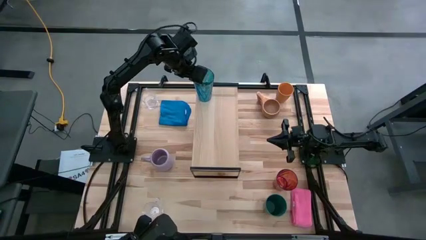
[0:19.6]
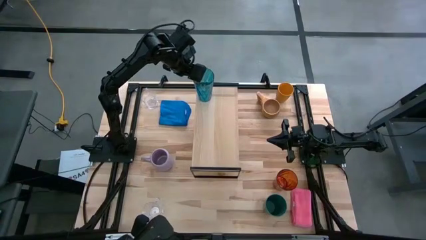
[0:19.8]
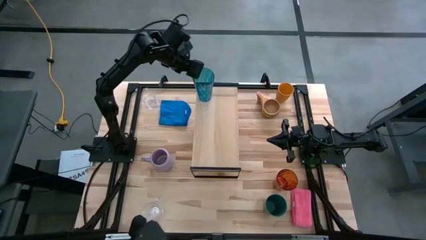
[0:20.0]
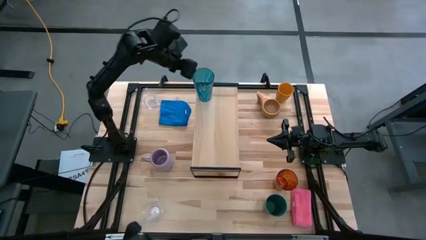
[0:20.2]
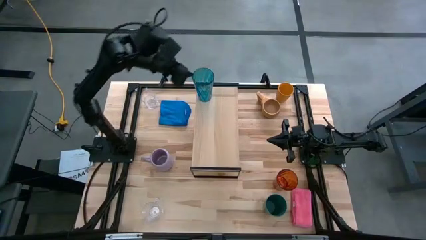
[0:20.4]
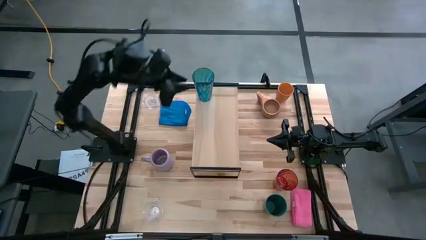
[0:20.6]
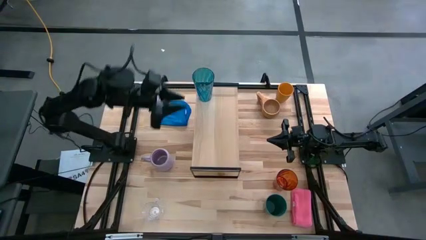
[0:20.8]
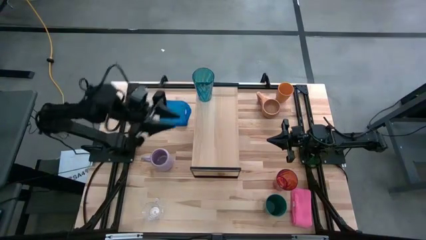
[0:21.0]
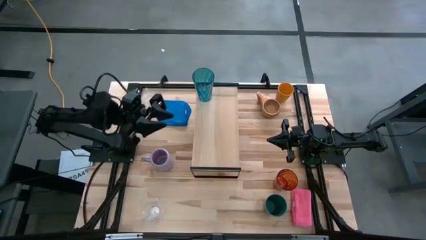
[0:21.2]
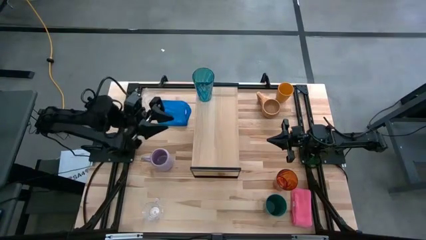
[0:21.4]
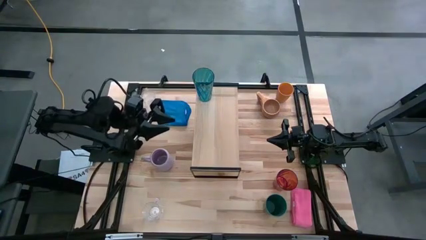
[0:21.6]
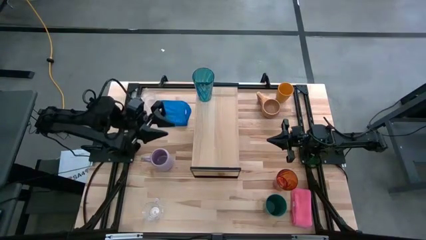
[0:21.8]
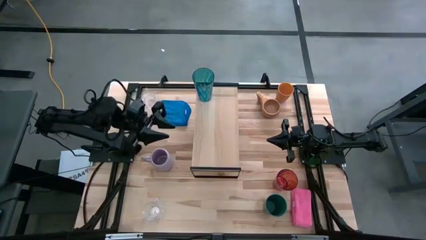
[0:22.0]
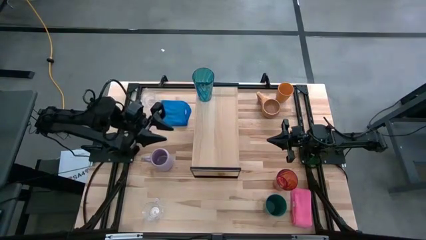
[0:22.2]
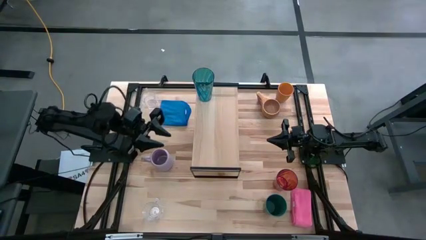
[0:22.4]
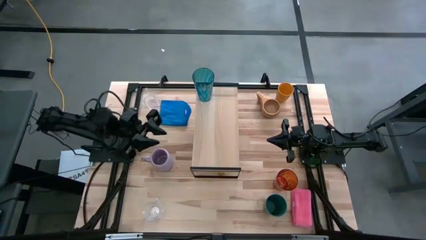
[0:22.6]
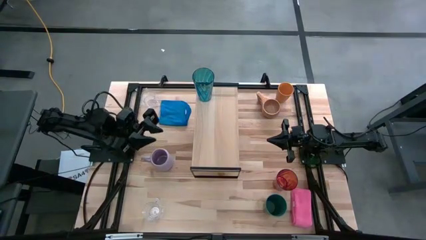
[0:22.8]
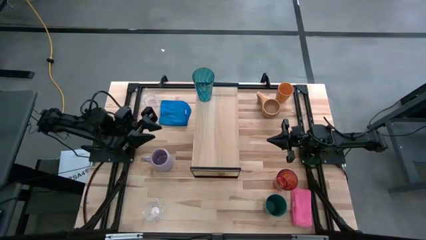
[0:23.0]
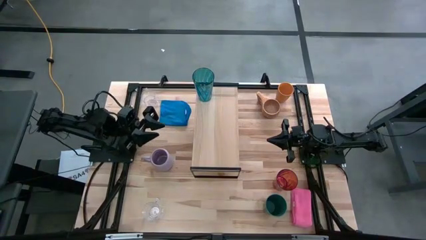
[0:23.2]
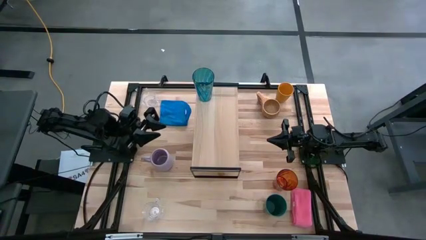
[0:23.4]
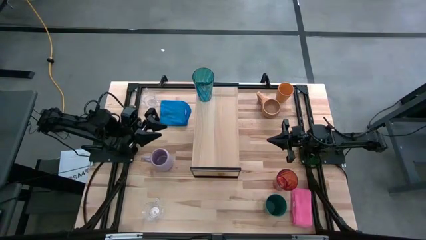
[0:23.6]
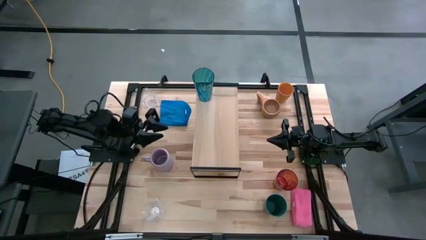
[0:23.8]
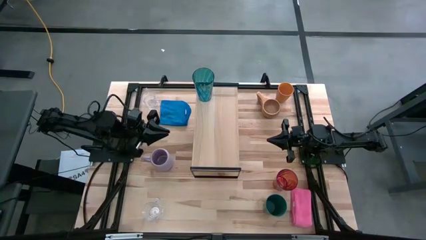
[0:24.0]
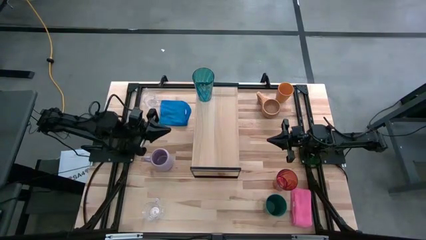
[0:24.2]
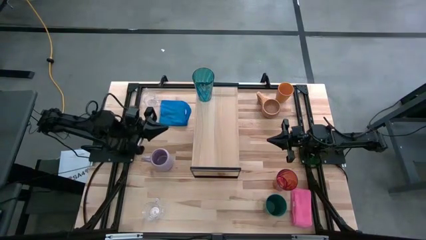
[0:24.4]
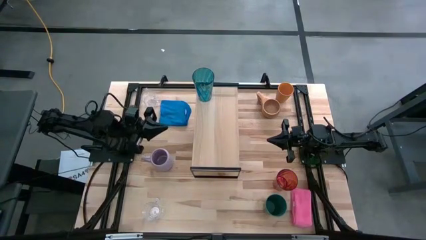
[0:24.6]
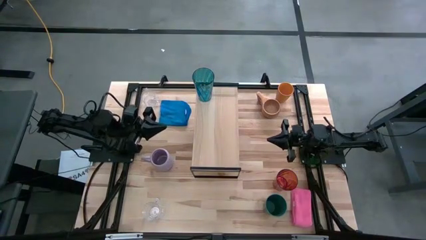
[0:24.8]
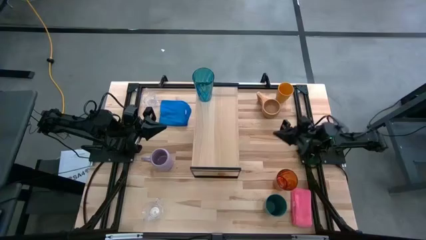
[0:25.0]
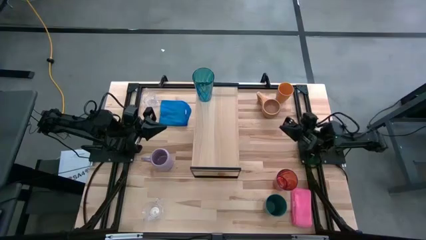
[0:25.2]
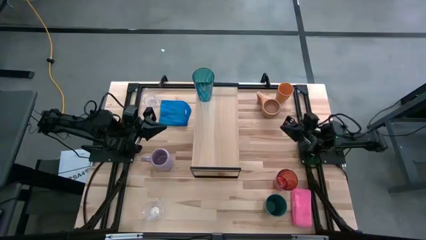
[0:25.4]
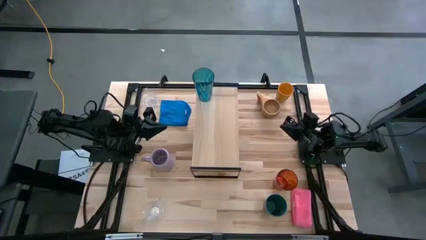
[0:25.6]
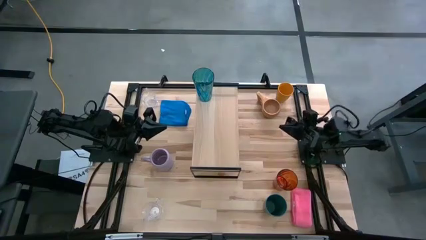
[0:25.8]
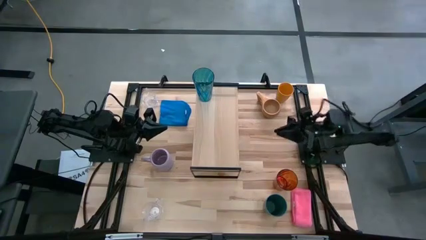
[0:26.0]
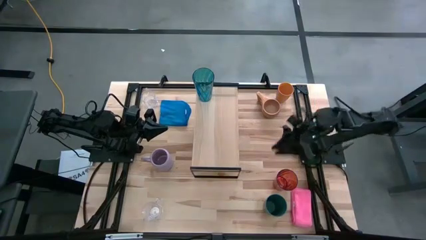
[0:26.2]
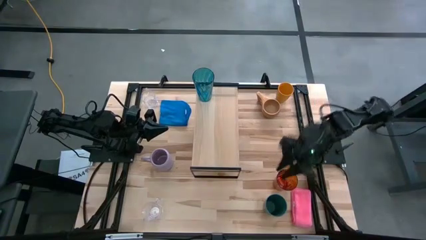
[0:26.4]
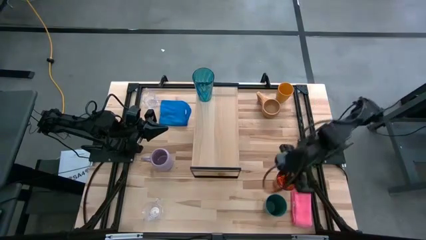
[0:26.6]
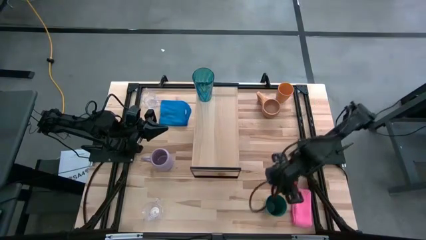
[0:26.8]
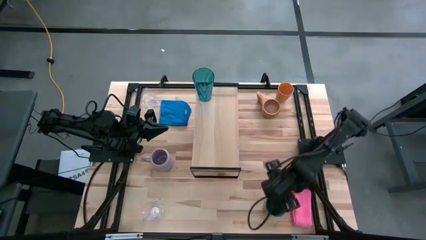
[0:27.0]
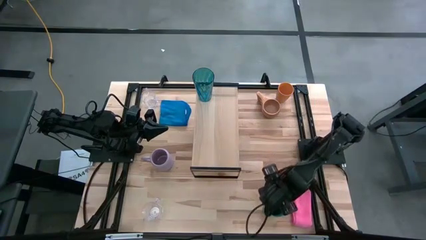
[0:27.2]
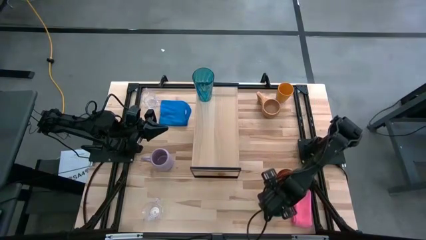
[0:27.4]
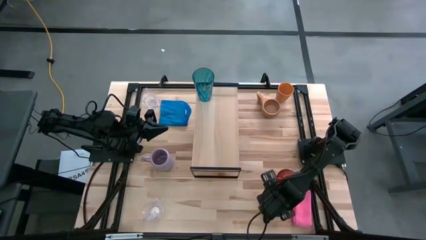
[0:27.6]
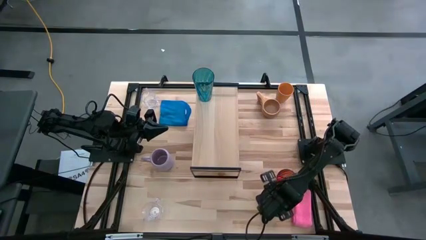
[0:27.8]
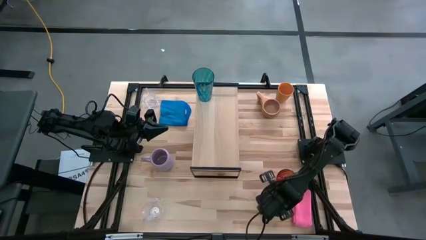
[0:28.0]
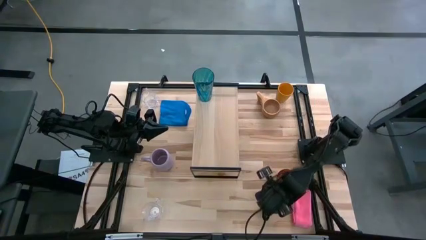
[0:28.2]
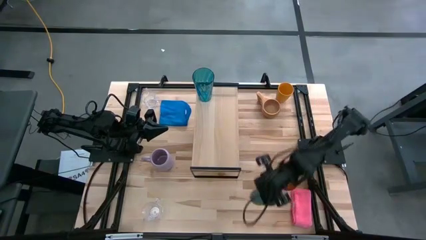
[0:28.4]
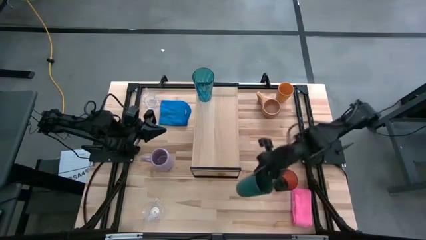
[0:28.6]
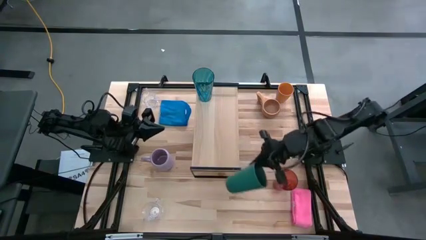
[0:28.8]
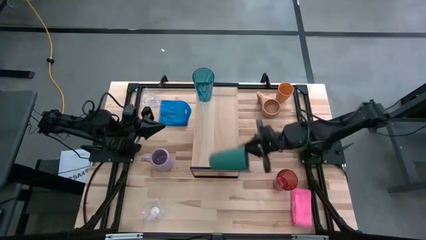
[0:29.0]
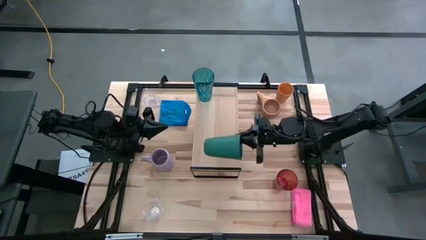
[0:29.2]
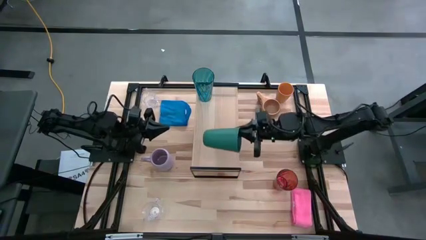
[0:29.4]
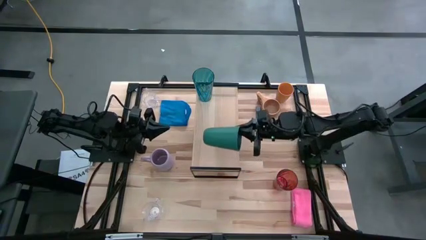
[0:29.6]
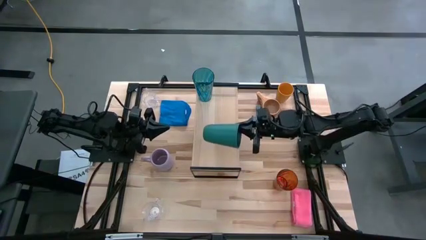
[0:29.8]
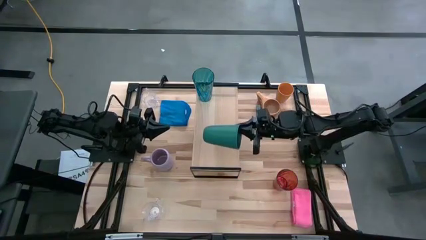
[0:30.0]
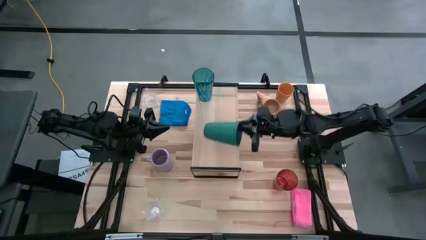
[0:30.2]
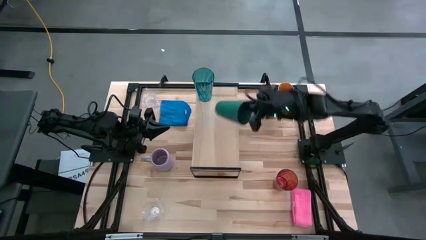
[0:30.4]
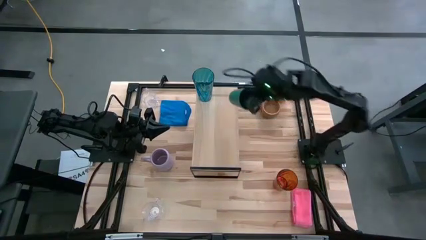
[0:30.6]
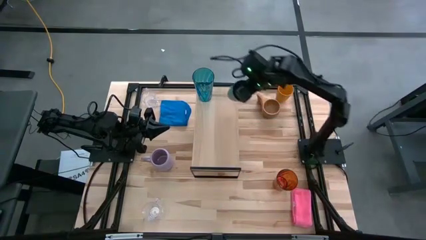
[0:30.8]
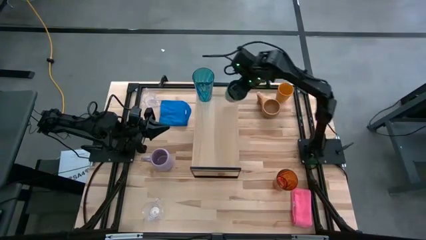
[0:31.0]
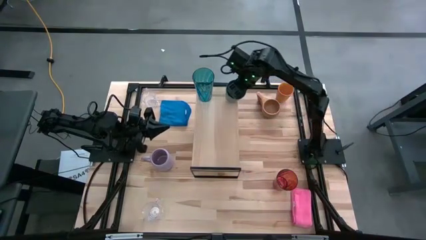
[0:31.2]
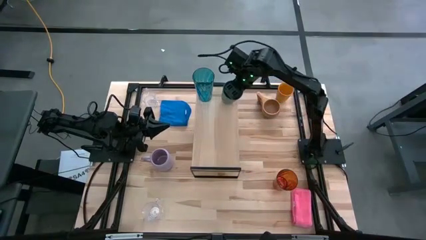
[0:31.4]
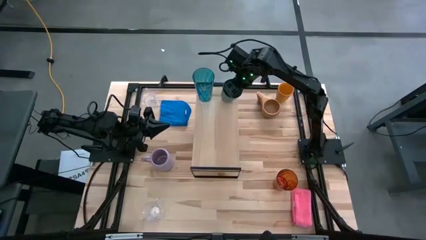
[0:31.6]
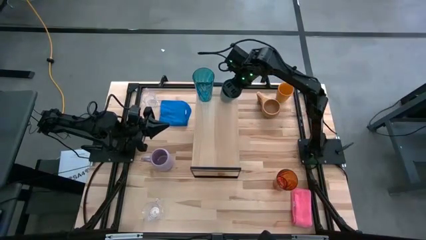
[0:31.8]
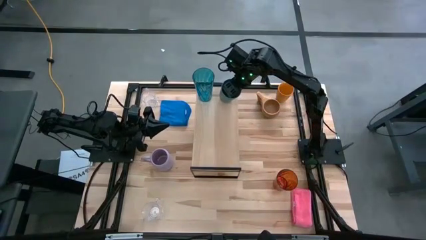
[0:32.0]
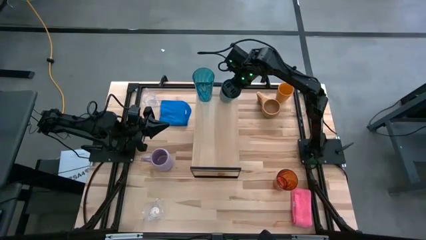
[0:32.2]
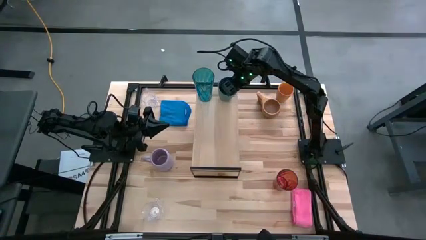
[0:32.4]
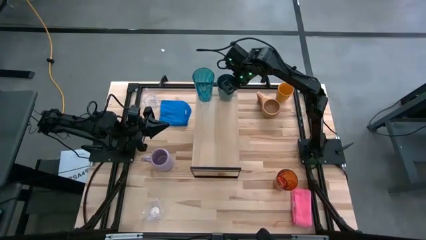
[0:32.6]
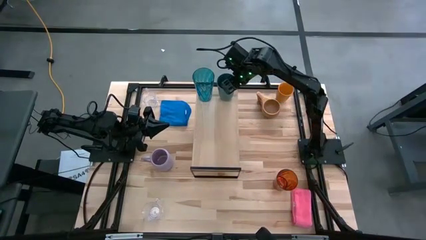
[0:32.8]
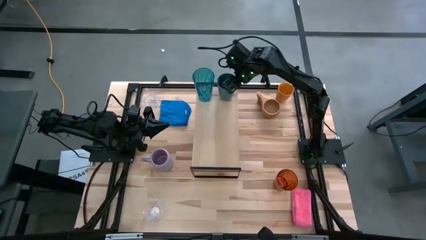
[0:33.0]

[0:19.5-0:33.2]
Task: Stack small to large cups/mugs on shelf
Put the dark blue cup on the shelf

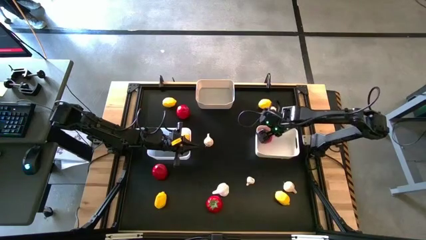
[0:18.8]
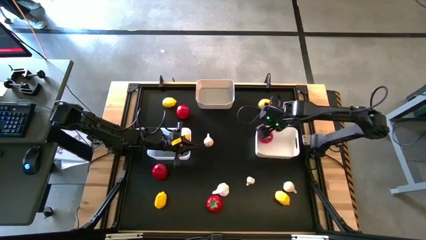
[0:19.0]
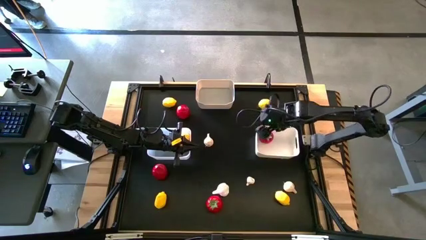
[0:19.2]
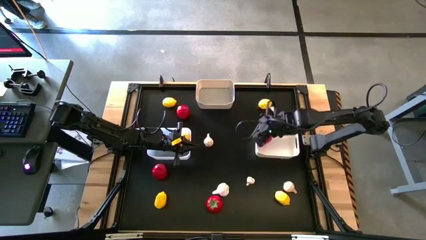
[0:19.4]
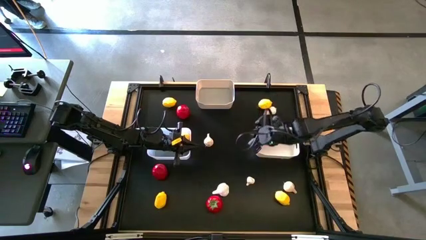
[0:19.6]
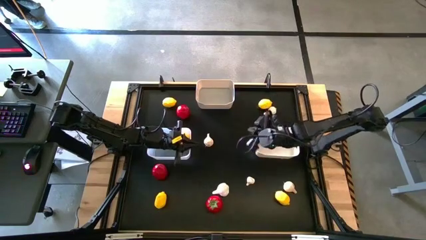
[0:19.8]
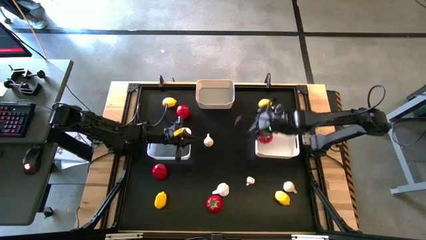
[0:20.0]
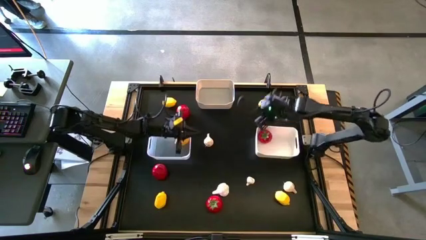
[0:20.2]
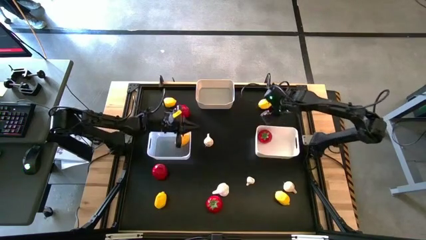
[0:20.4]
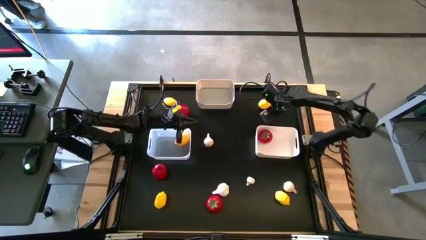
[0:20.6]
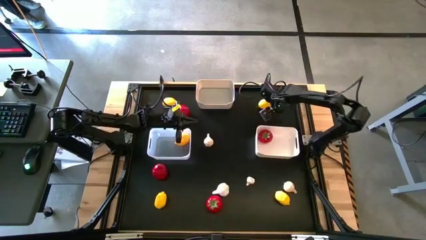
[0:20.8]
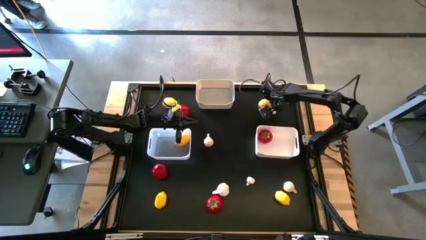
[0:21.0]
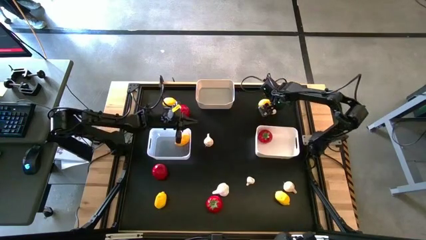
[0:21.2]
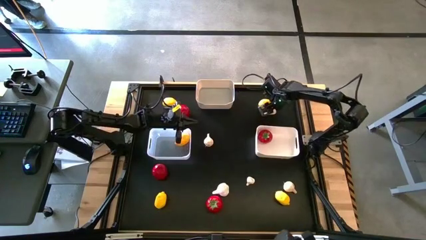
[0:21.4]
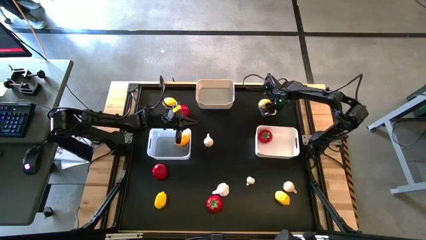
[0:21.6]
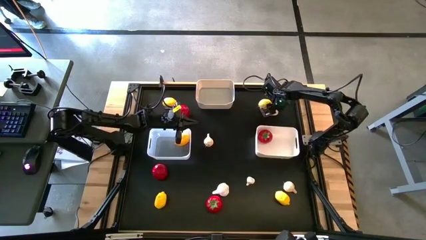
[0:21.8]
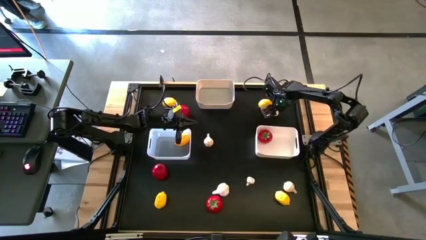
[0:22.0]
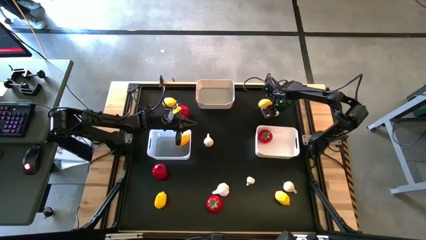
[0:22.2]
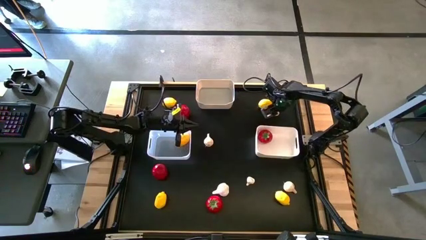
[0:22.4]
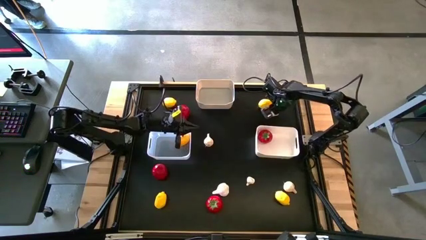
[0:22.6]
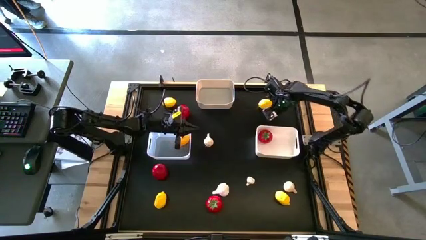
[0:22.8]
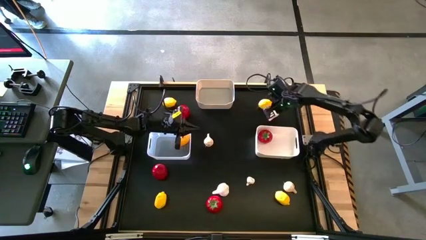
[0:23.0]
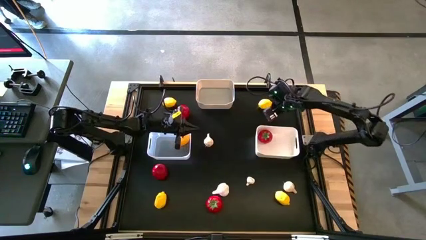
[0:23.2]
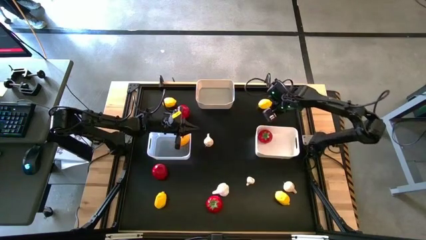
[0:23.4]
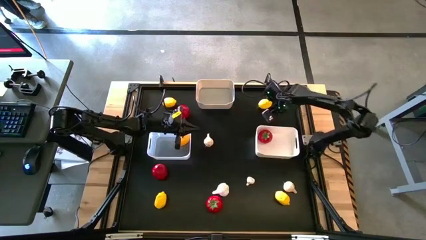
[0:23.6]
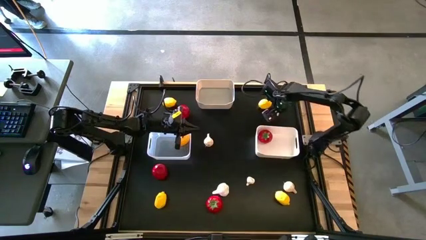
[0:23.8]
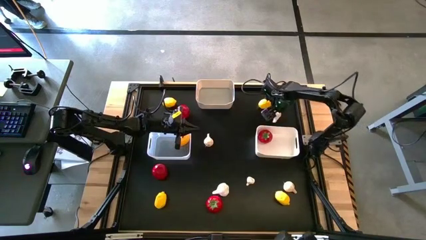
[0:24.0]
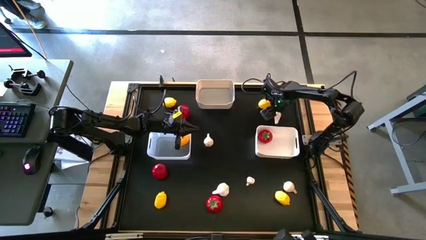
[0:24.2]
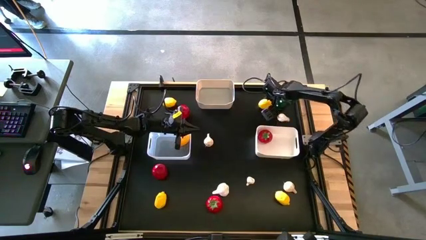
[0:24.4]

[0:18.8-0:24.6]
Task: Sort produce into baskets
Put the white garlic into the top left white bin
